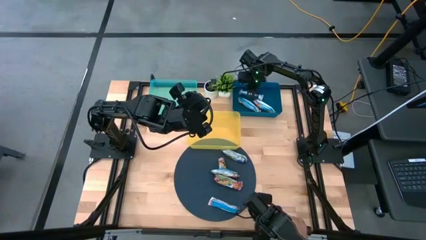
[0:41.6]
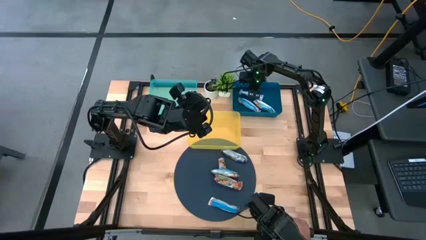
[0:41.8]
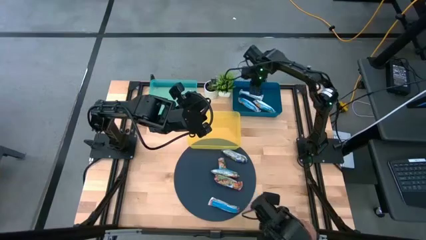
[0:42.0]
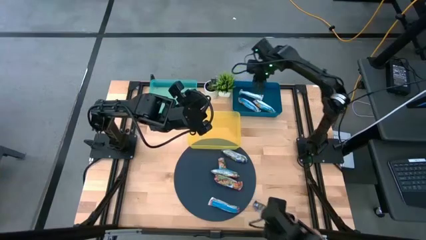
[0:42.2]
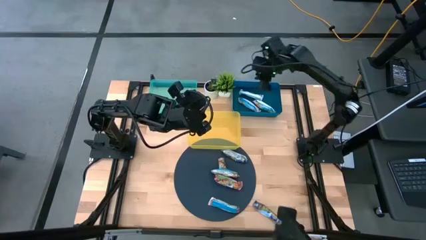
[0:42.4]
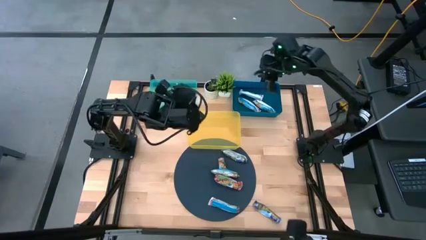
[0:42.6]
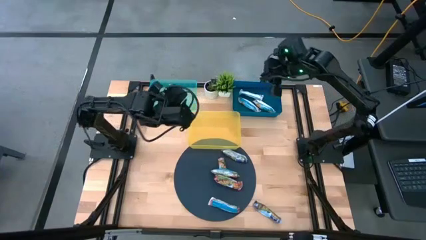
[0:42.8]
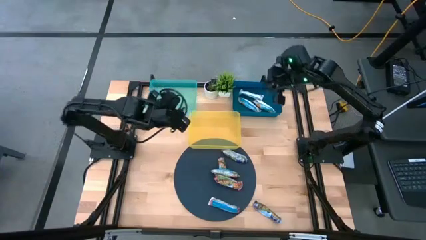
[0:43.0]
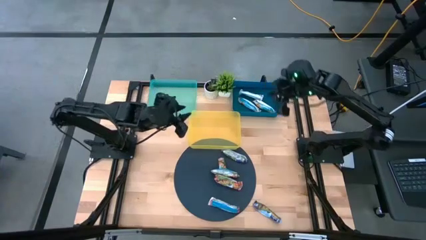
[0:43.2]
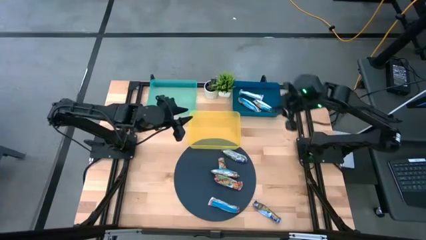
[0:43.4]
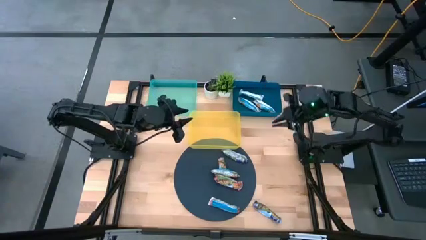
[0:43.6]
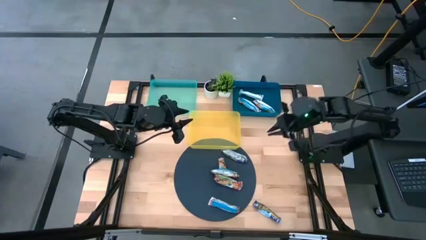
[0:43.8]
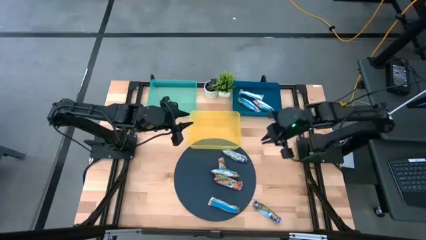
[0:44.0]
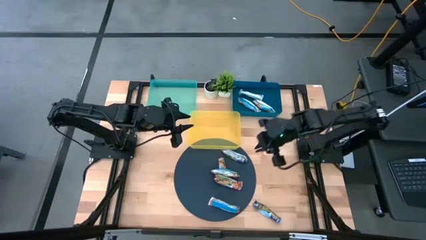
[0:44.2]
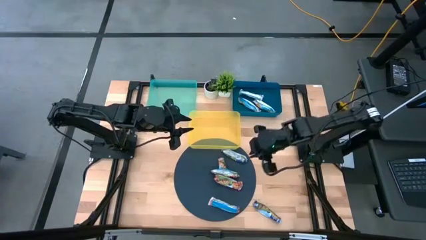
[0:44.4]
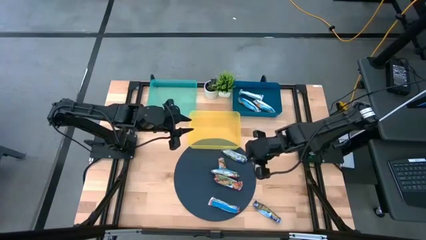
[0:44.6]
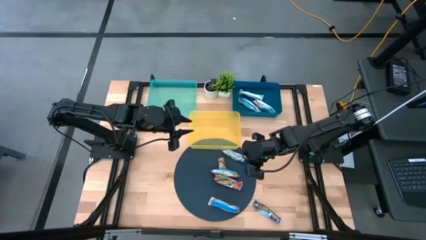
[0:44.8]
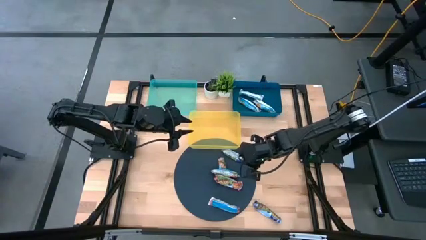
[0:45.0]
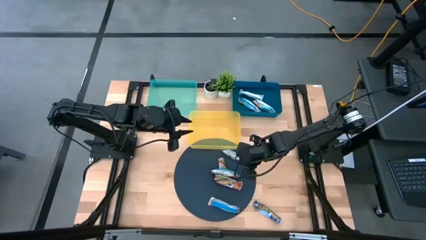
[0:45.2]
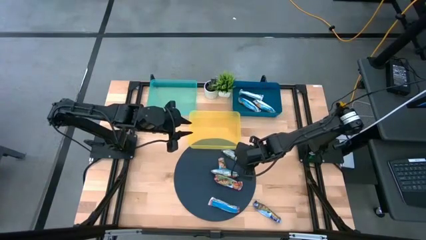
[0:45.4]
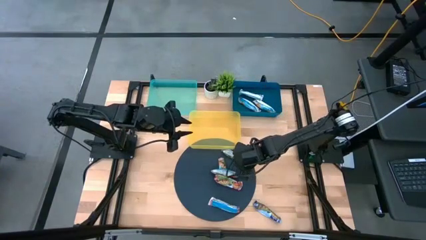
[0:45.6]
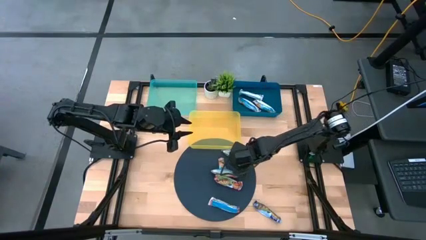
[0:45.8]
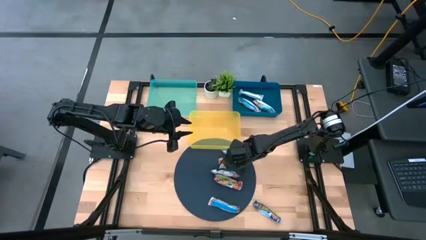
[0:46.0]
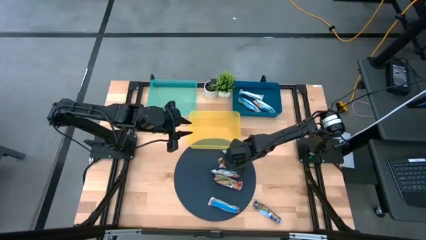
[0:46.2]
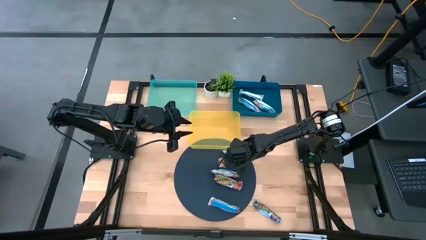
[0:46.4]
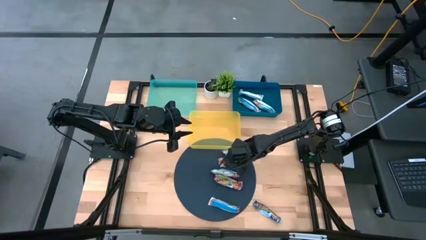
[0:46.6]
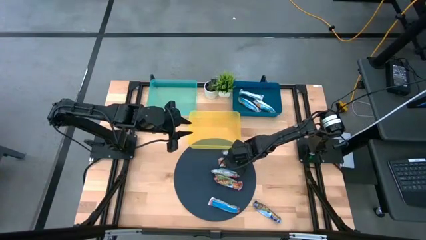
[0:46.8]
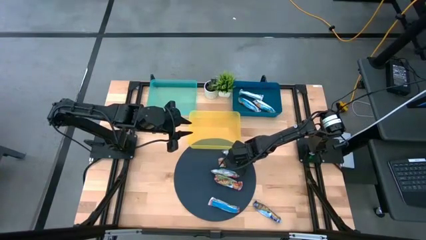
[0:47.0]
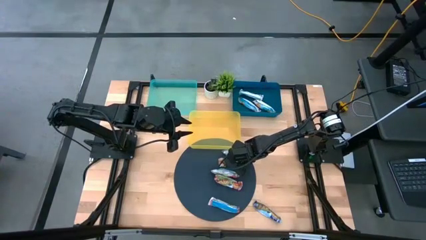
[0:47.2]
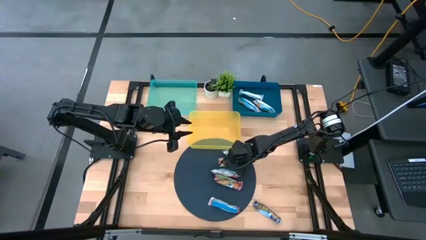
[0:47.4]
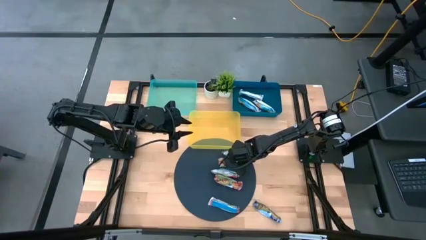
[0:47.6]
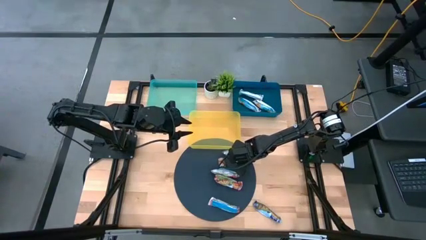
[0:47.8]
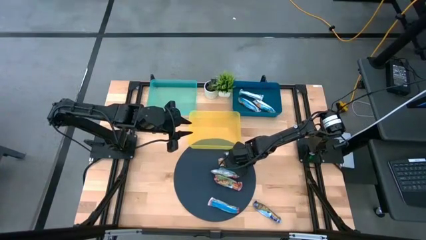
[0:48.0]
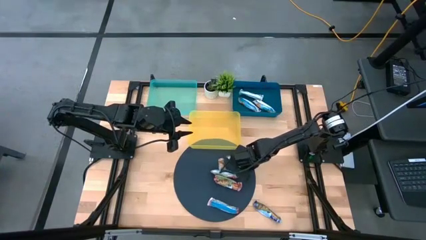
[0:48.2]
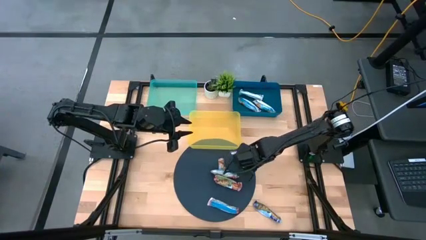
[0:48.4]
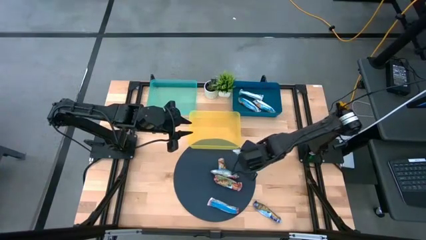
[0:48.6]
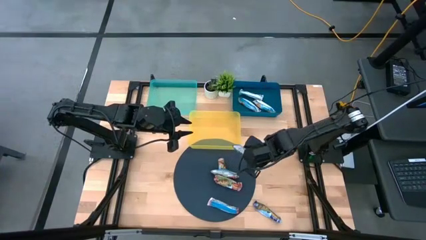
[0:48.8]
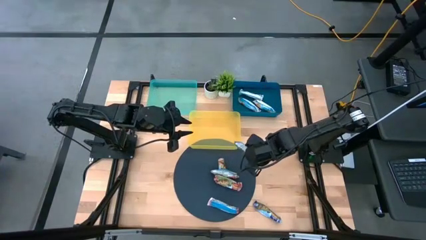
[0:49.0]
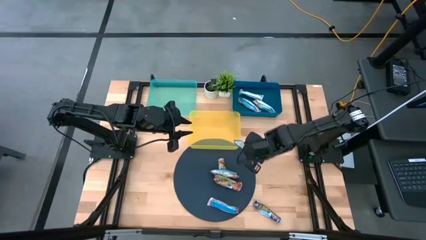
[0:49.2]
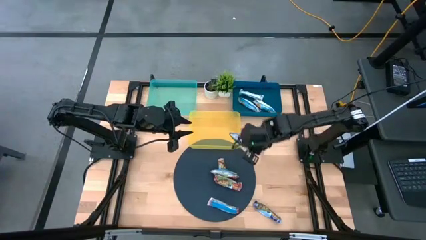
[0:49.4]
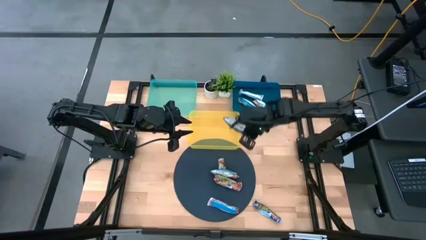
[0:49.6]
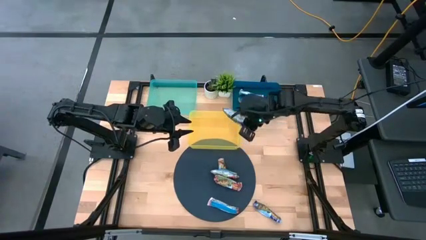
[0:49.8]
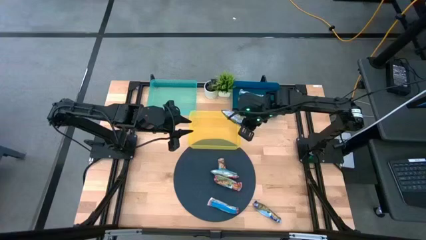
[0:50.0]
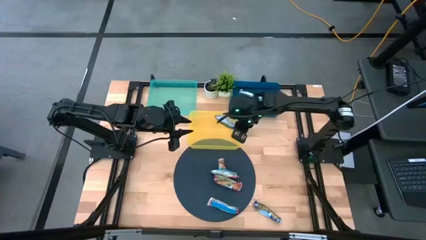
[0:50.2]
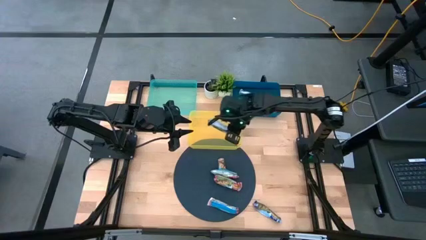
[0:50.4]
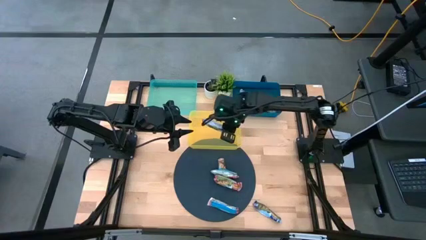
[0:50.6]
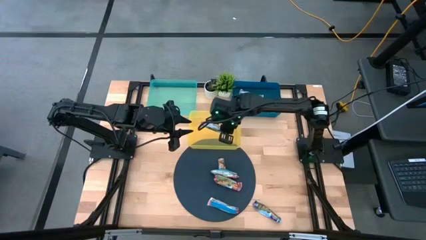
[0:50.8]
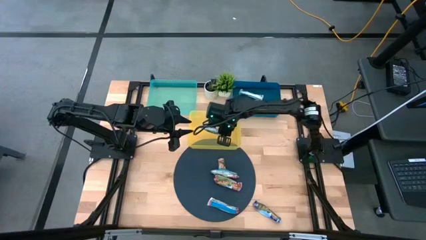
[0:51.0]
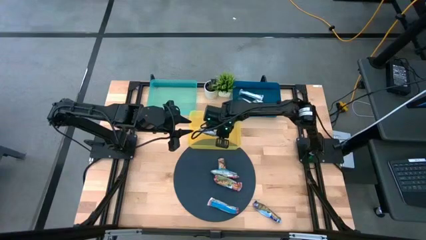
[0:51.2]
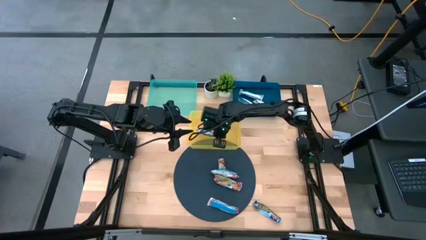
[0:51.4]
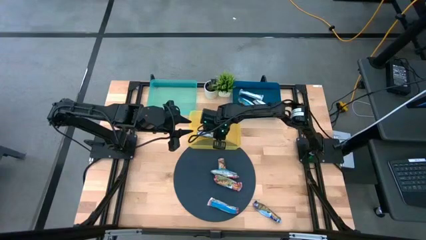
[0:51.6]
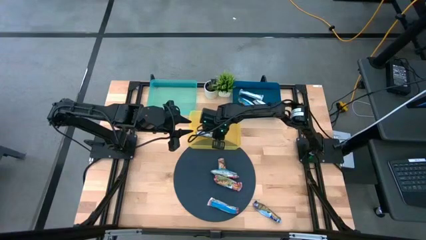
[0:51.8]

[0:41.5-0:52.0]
Task: Pick and place Granola Bars by type
Put the blue granola bar into the yellow bin
